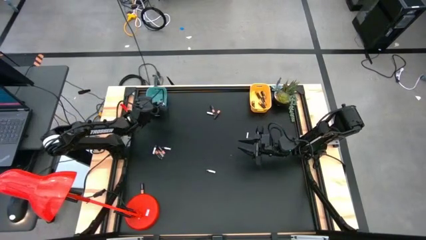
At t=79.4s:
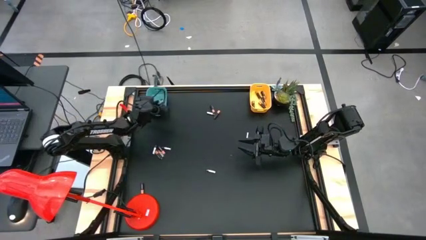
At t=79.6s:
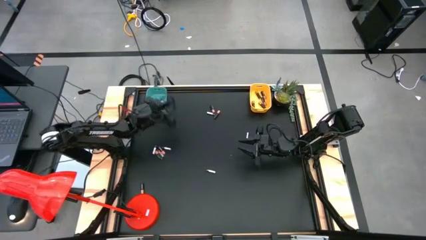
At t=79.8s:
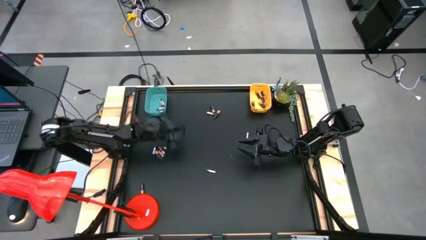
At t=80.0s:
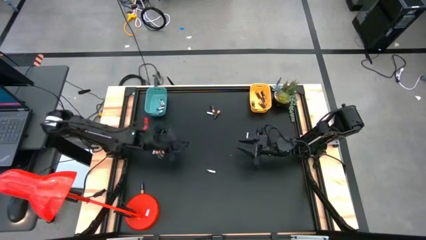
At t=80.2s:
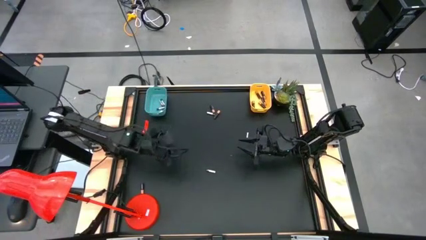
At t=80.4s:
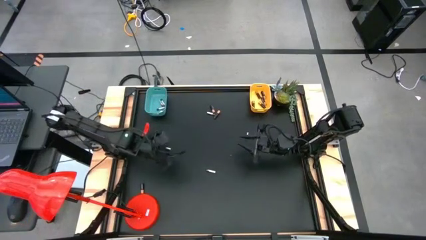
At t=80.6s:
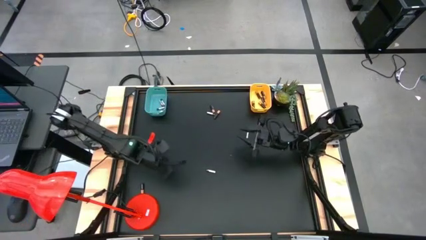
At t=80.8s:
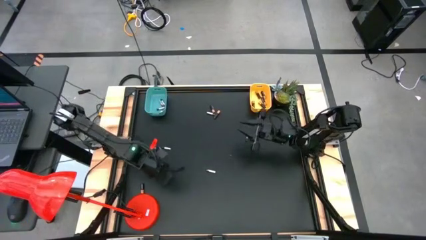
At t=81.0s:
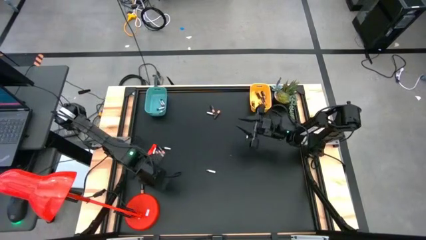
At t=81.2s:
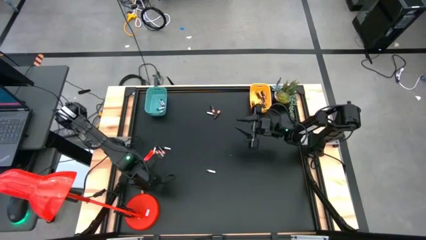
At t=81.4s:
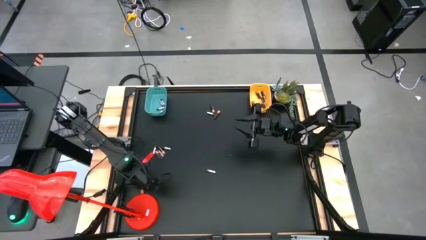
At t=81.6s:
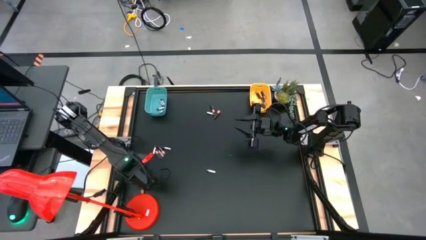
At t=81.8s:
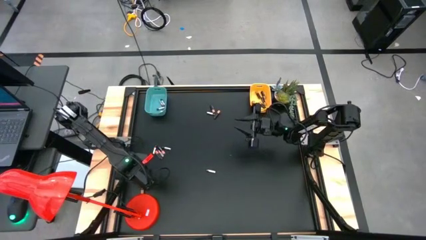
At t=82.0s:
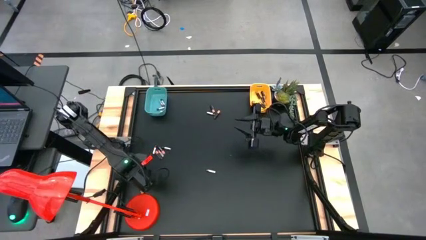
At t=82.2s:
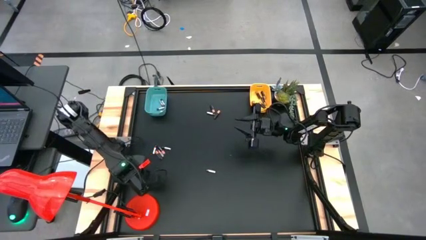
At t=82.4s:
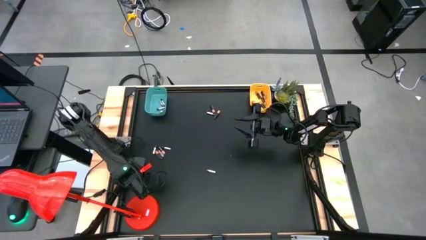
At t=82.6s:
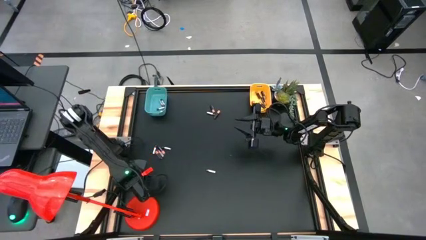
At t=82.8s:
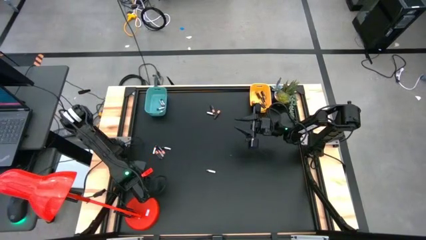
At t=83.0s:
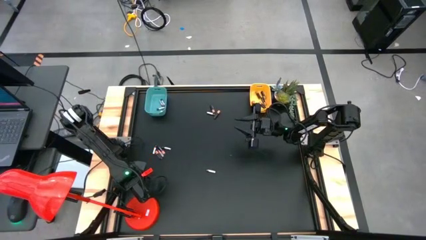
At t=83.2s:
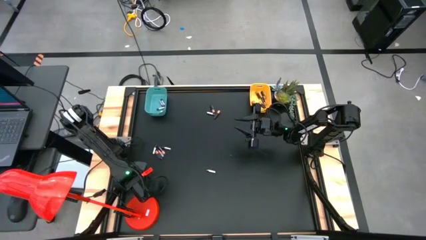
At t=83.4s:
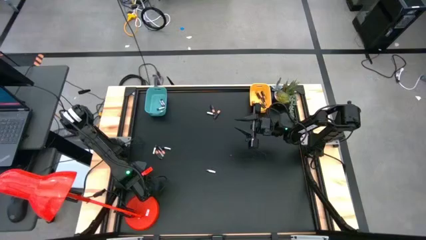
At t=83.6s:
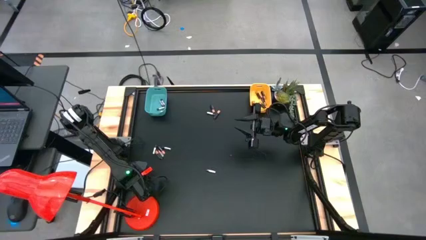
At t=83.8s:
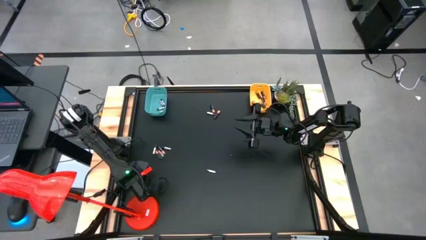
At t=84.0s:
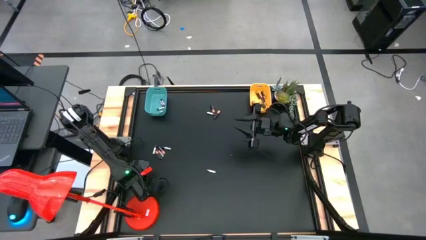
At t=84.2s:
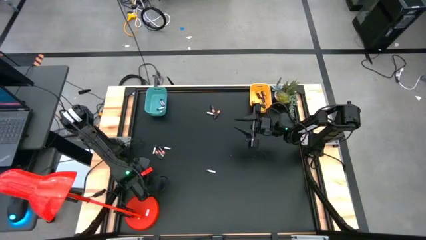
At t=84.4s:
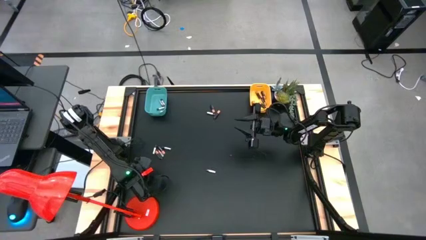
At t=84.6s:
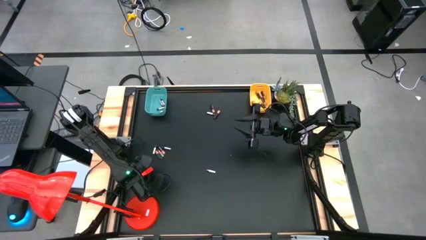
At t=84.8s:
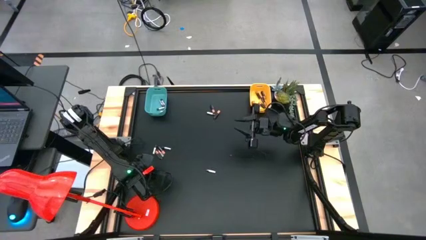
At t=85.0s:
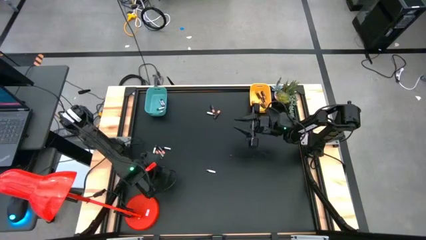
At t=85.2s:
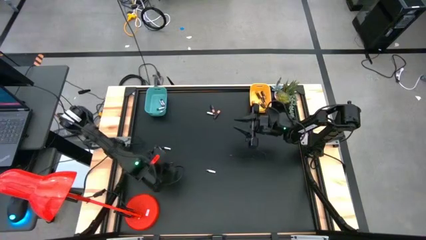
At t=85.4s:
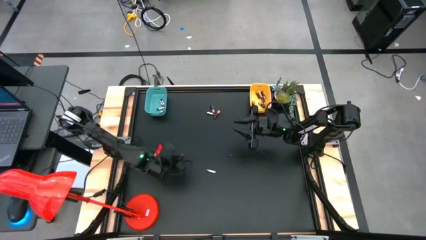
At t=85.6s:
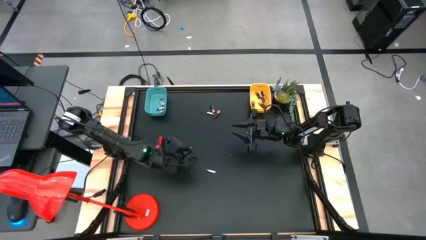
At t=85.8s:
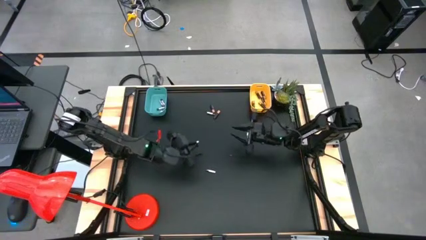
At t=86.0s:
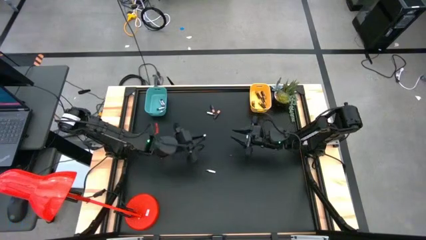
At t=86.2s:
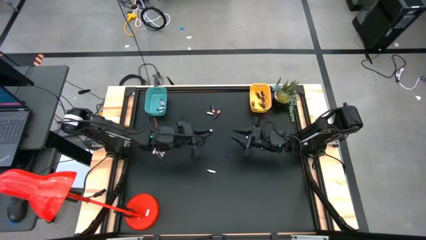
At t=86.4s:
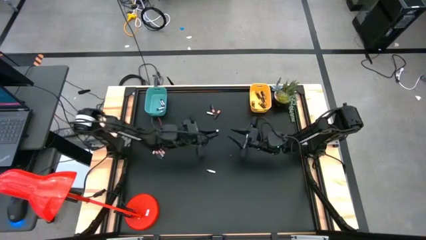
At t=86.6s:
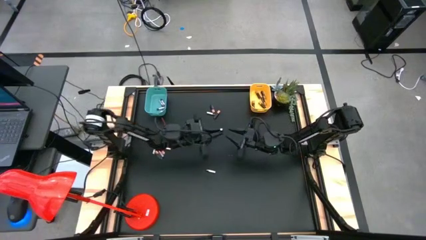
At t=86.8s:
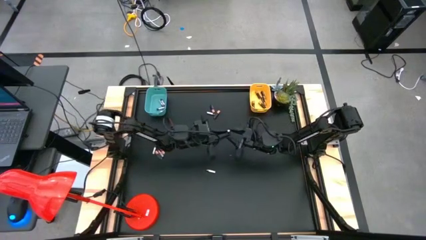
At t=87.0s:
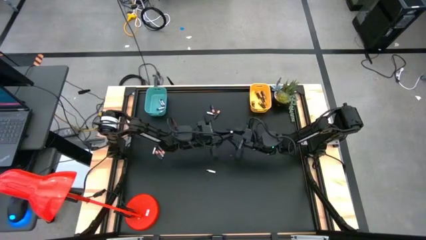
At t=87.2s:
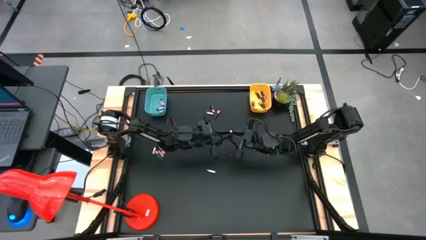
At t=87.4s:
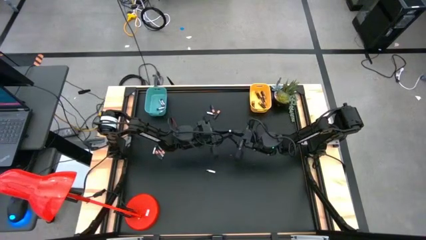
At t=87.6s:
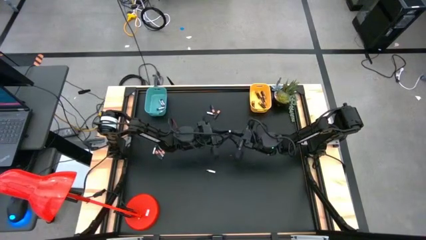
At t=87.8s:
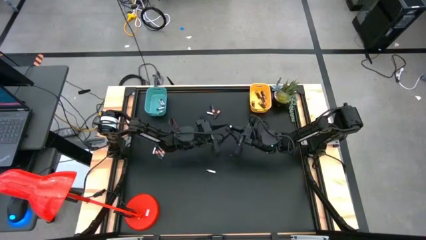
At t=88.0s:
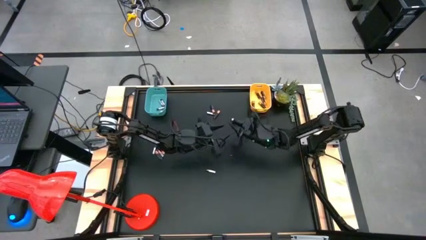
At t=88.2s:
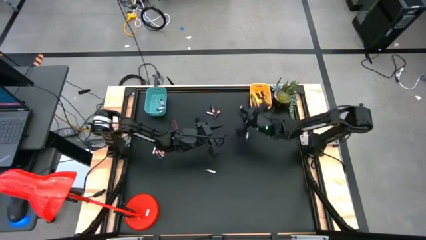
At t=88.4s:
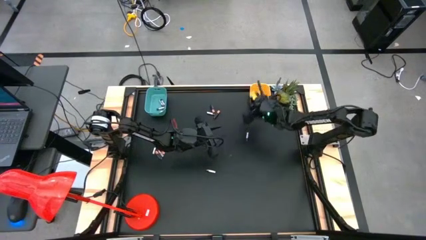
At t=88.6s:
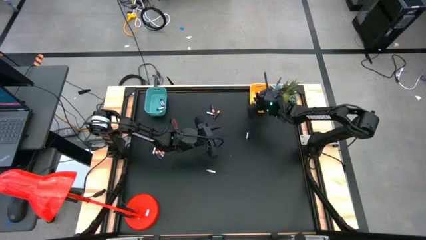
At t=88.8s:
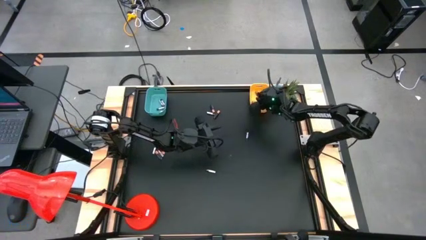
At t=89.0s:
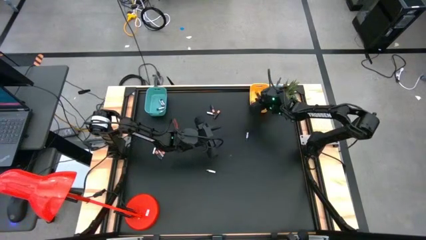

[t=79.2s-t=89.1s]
Task: Sort batteries
Put the black battery into the yellow bin

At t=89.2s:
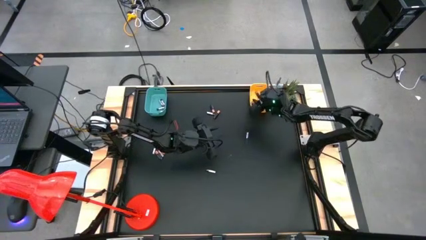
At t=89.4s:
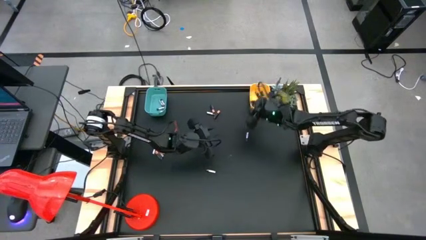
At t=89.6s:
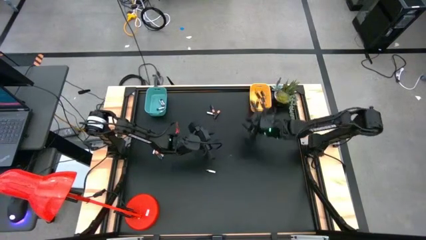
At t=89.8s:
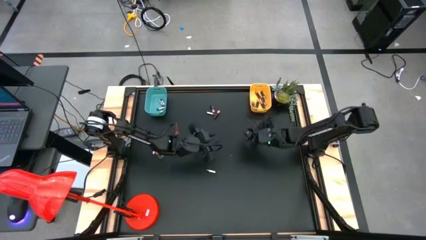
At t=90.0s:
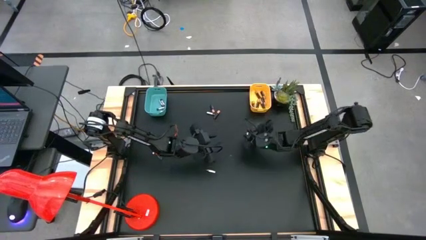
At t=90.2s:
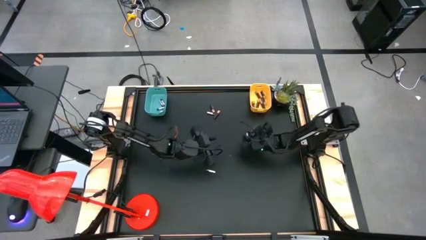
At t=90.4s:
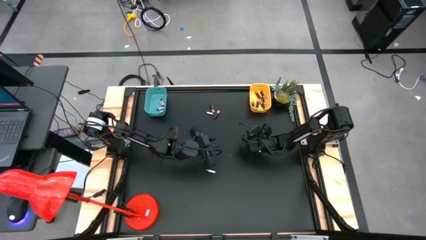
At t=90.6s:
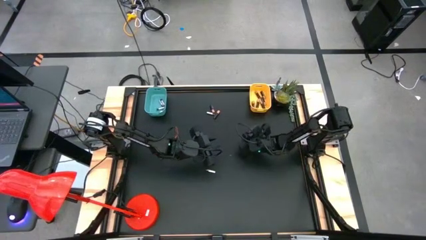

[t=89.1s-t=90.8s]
Put the silver battery into the blue bin

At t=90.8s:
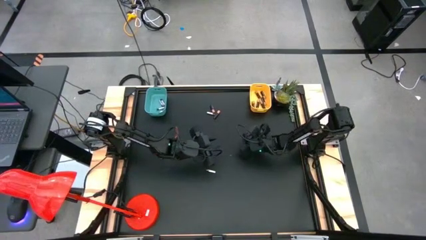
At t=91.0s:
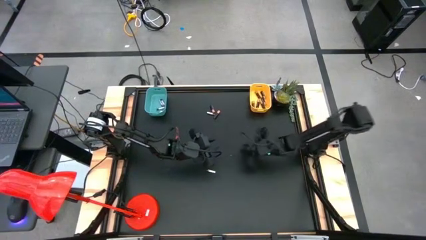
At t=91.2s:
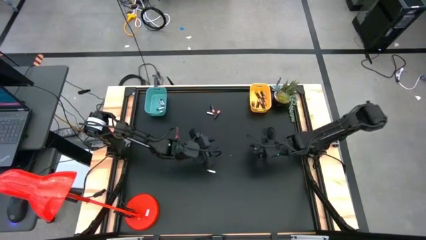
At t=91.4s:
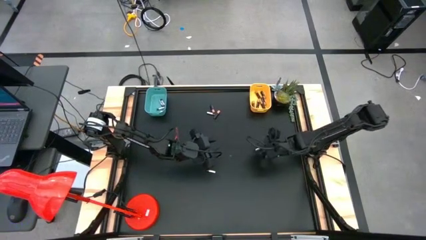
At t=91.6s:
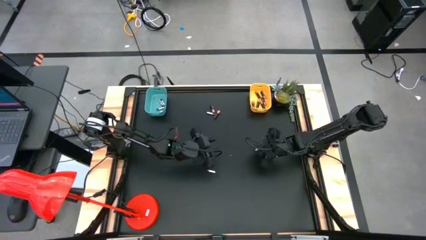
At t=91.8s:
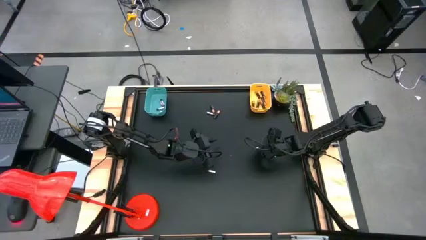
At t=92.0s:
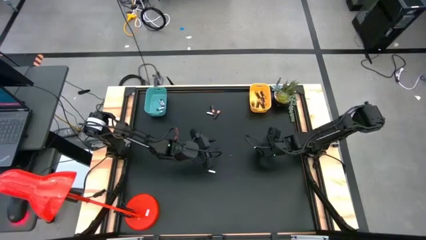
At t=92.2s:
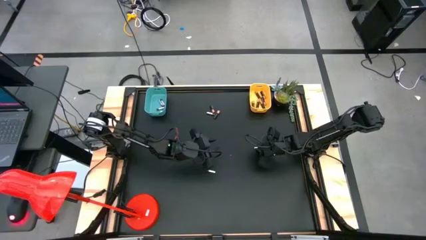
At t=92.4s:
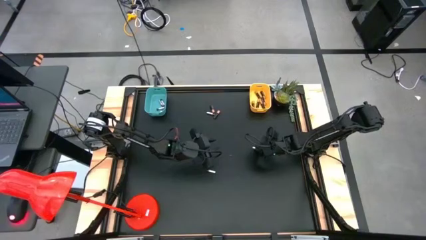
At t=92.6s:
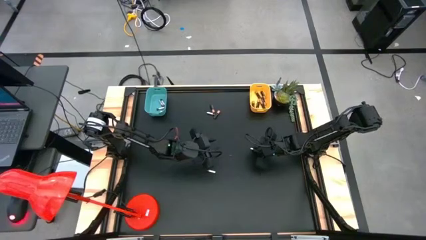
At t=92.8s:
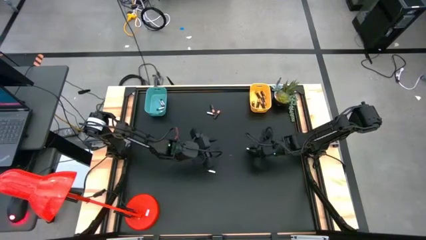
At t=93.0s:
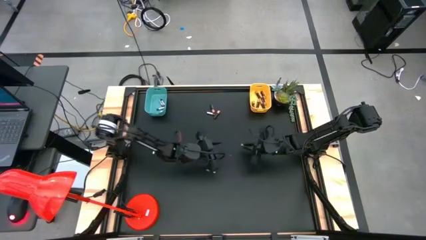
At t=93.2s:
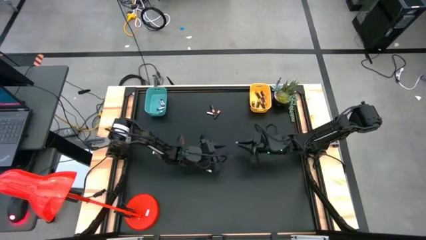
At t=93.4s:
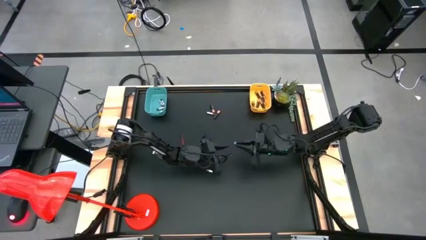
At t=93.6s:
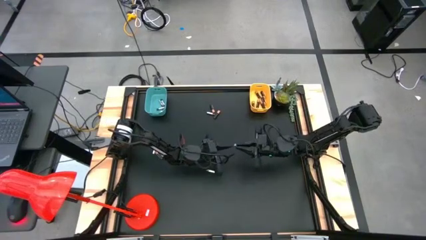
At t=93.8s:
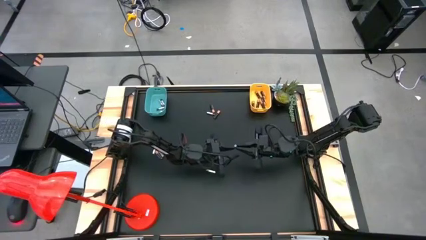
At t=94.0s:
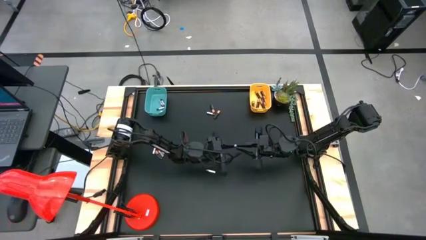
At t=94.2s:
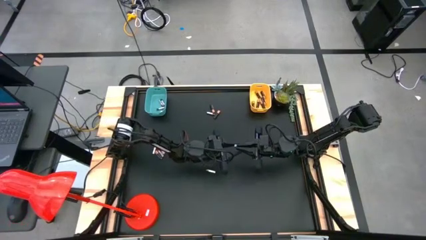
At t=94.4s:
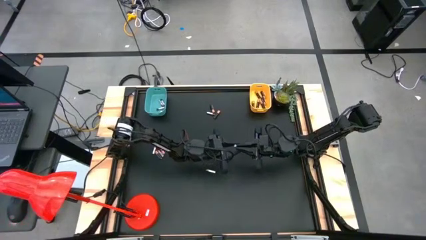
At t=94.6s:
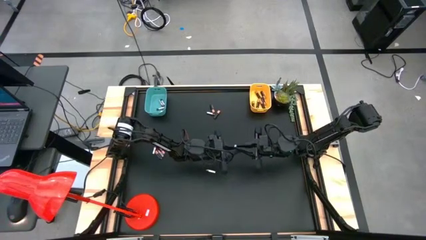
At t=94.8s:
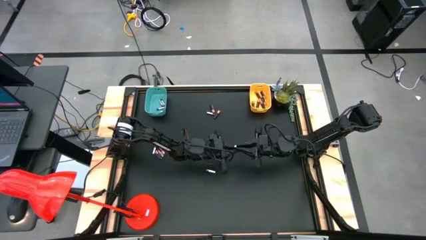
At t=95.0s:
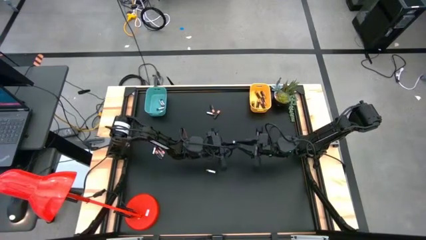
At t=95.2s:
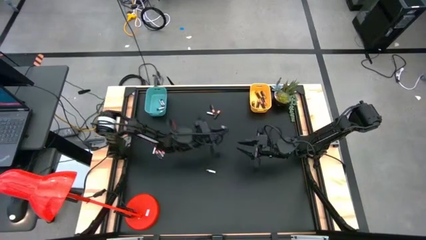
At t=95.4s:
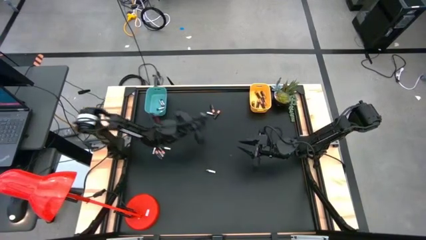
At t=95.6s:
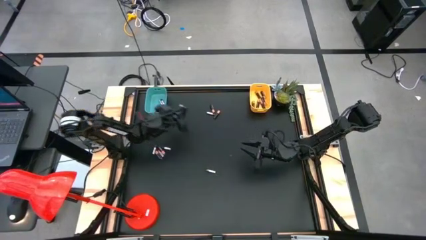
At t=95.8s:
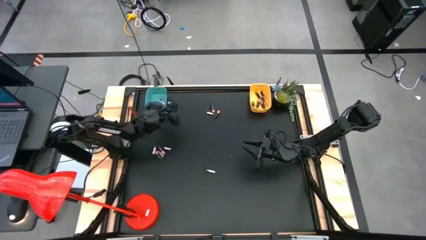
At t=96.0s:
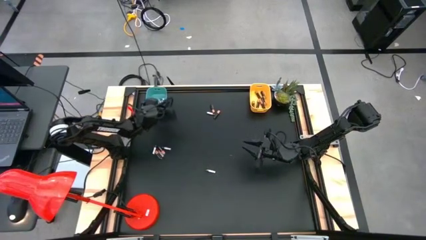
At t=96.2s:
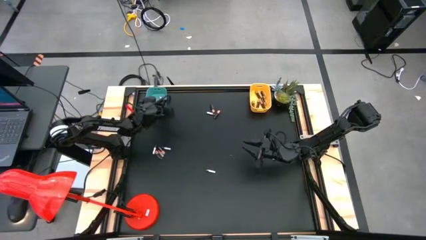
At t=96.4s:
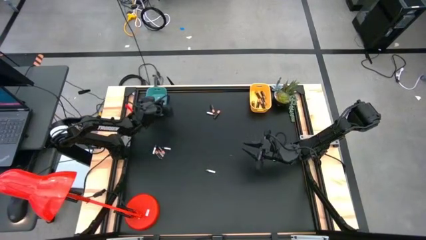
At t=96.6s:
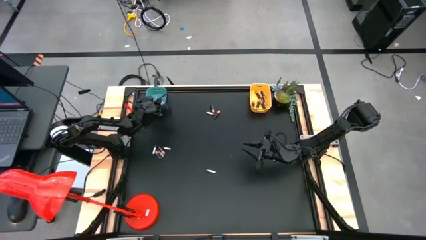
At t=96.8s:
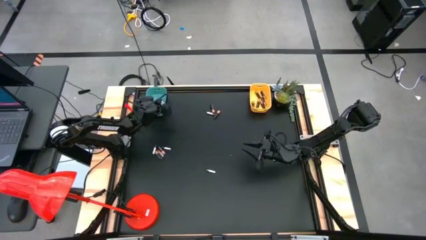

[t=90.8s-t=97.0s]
Put the silver battery into the blue bin
